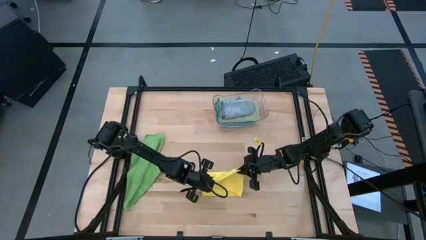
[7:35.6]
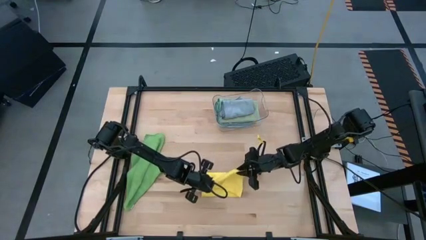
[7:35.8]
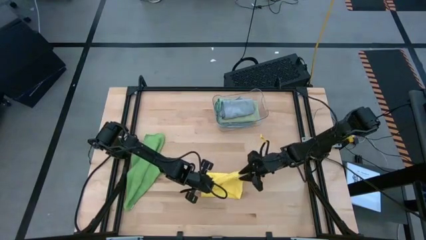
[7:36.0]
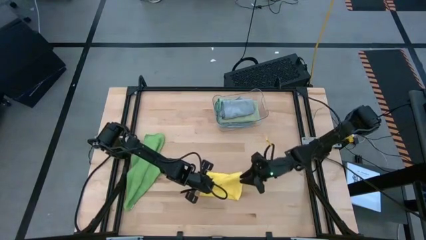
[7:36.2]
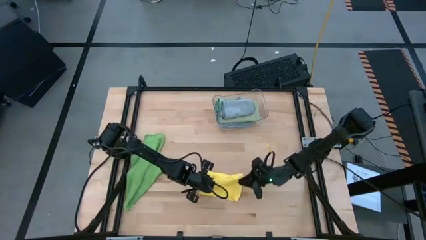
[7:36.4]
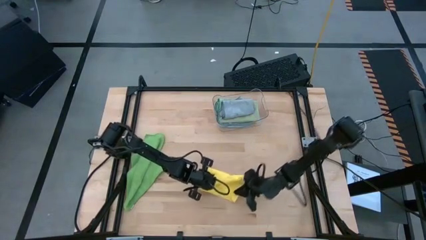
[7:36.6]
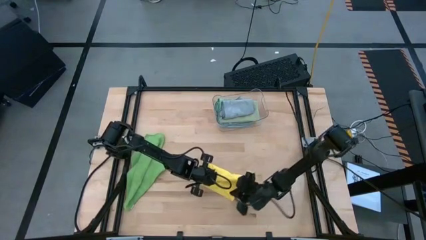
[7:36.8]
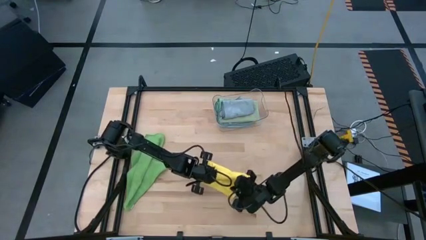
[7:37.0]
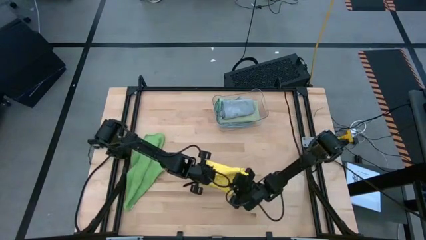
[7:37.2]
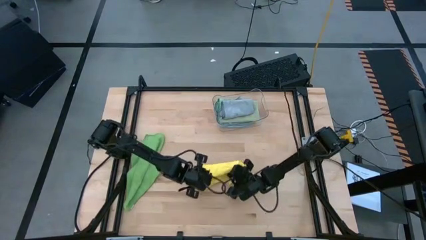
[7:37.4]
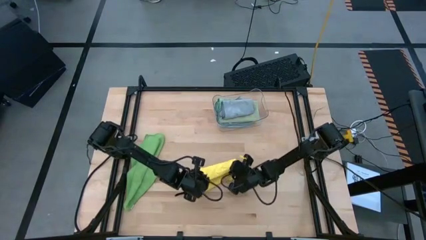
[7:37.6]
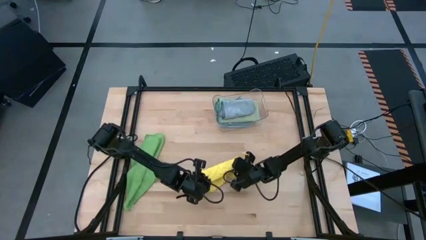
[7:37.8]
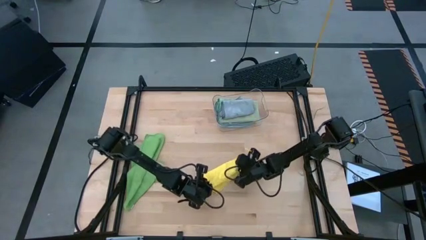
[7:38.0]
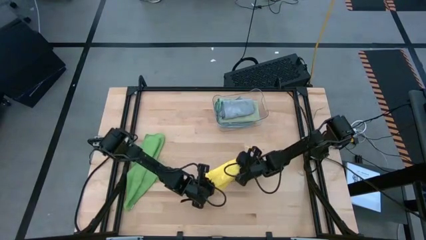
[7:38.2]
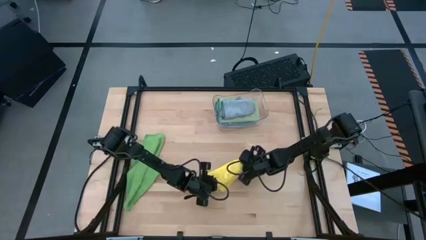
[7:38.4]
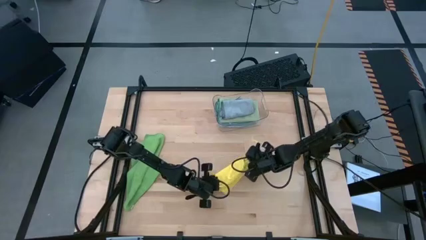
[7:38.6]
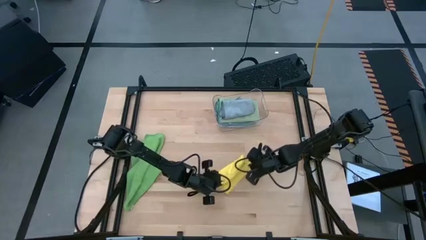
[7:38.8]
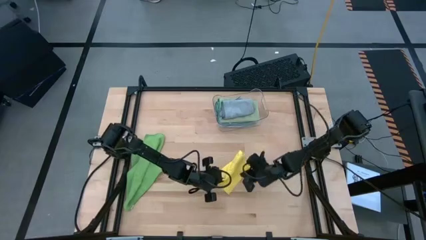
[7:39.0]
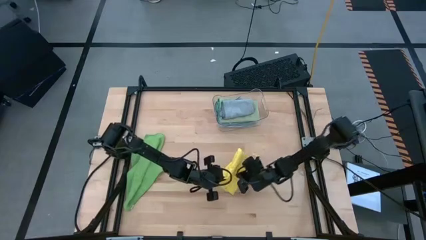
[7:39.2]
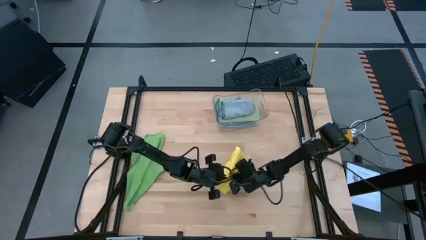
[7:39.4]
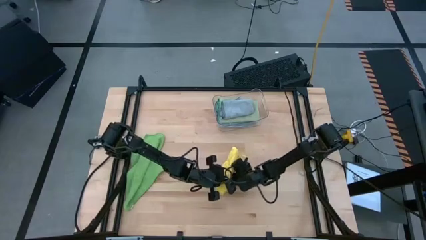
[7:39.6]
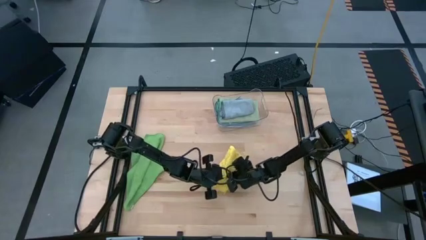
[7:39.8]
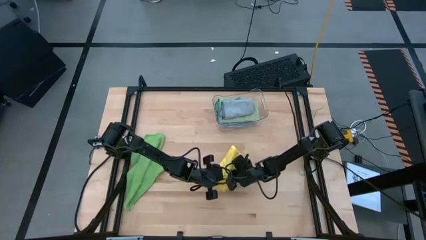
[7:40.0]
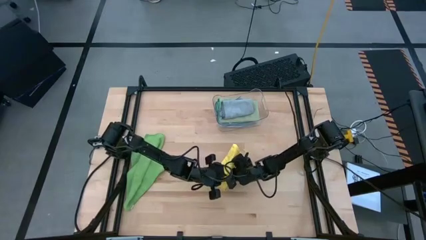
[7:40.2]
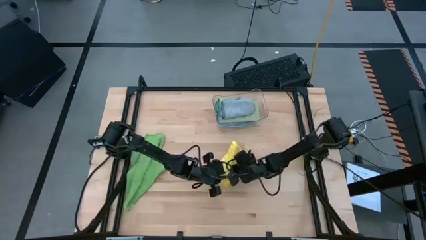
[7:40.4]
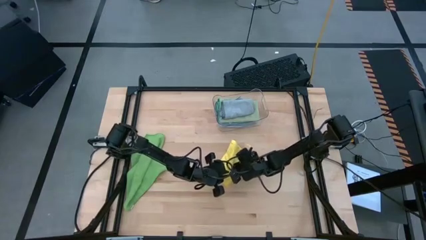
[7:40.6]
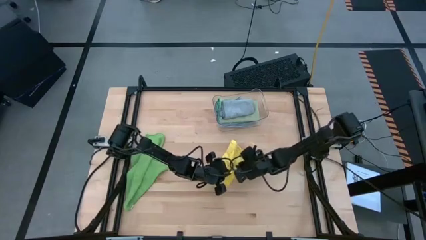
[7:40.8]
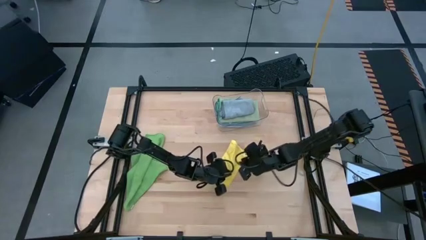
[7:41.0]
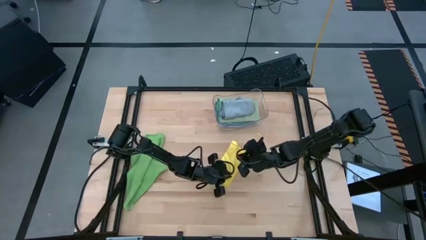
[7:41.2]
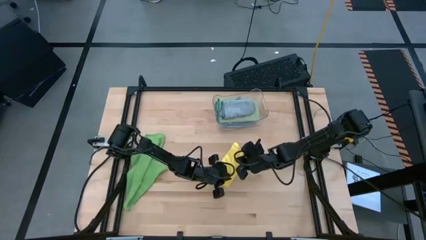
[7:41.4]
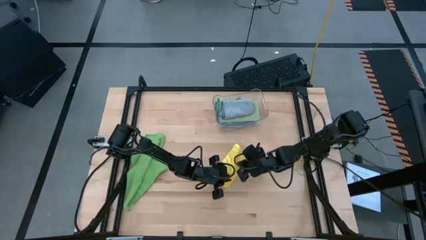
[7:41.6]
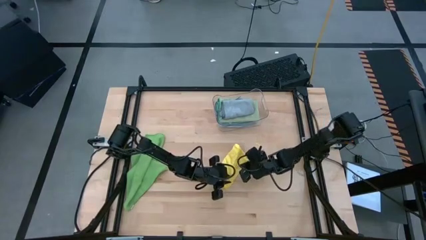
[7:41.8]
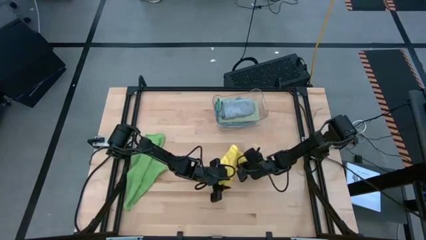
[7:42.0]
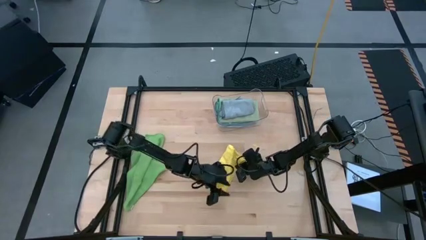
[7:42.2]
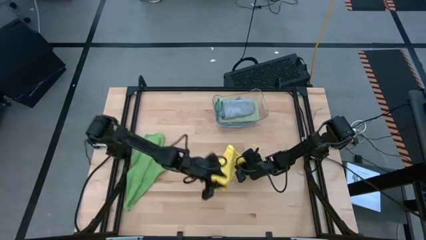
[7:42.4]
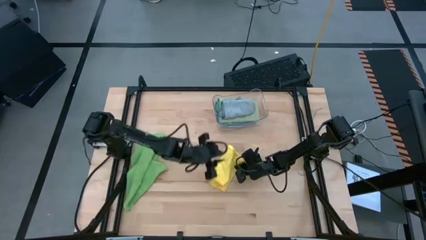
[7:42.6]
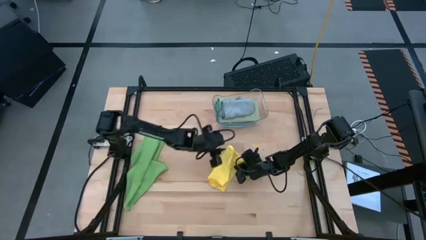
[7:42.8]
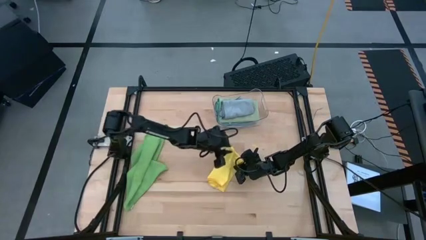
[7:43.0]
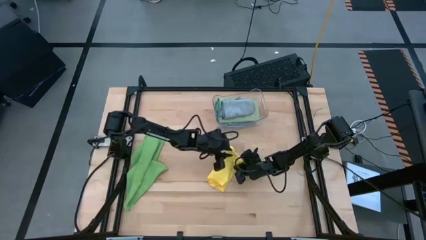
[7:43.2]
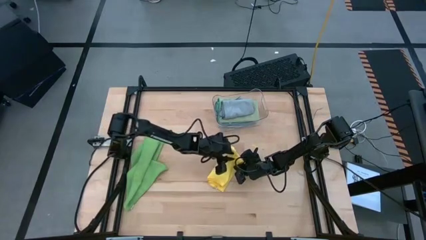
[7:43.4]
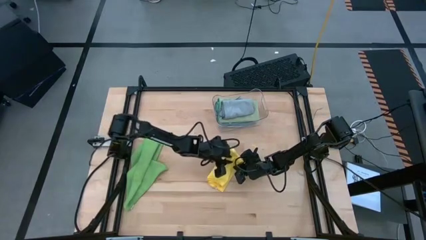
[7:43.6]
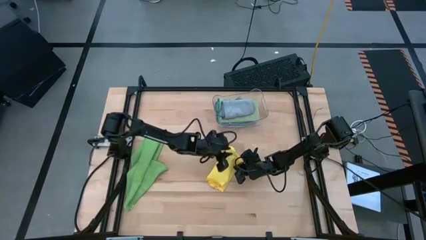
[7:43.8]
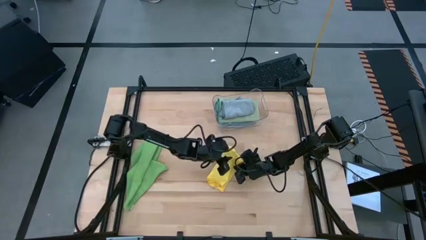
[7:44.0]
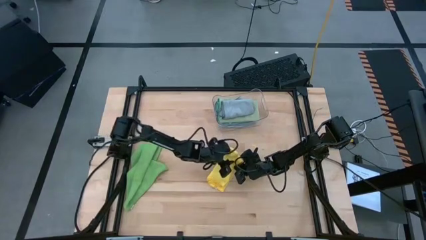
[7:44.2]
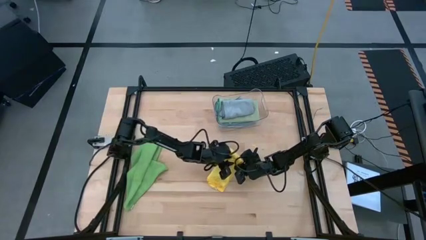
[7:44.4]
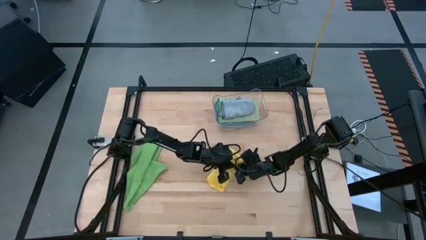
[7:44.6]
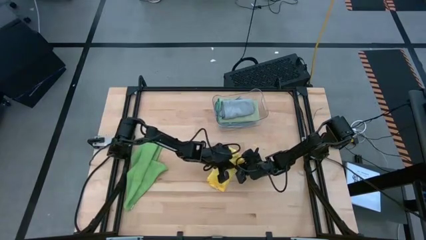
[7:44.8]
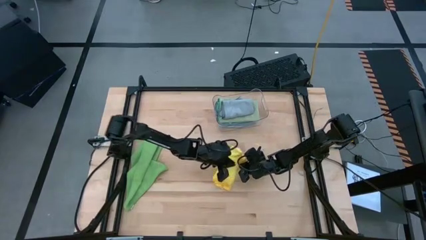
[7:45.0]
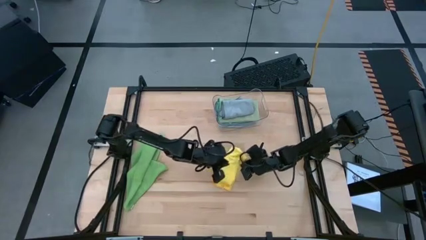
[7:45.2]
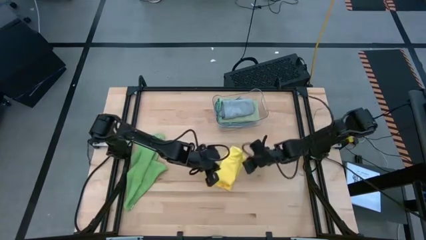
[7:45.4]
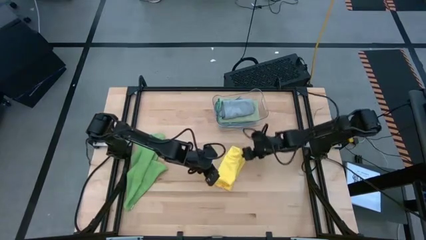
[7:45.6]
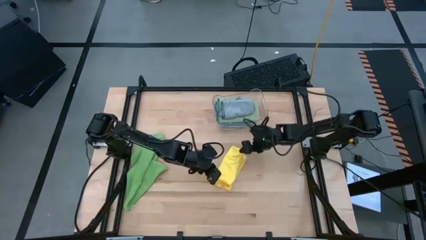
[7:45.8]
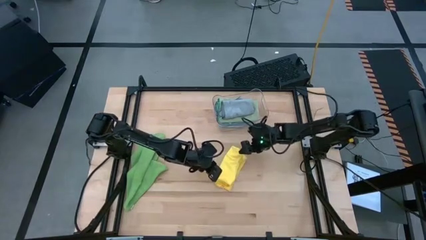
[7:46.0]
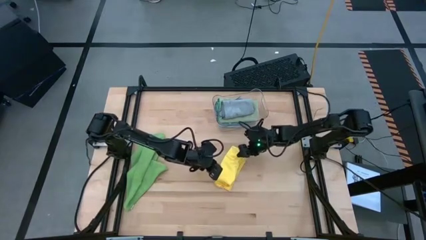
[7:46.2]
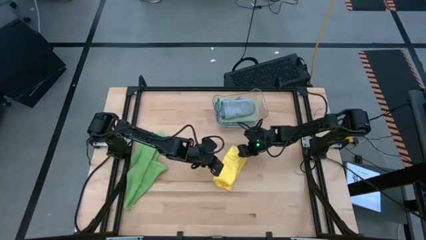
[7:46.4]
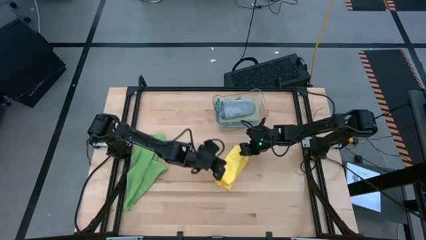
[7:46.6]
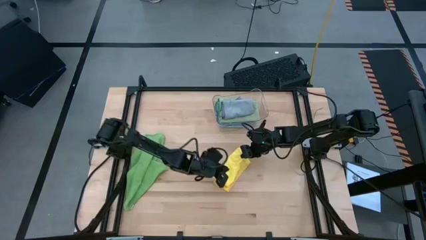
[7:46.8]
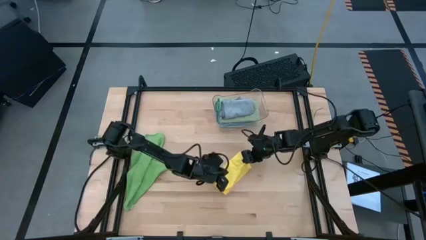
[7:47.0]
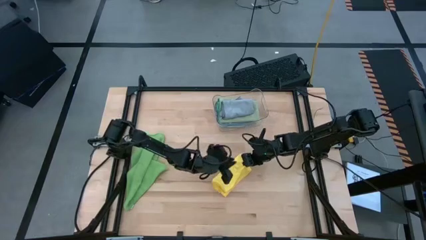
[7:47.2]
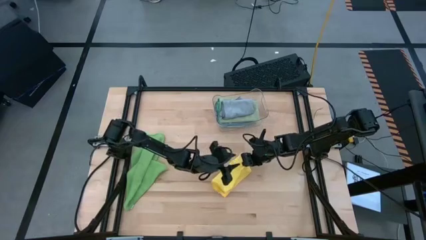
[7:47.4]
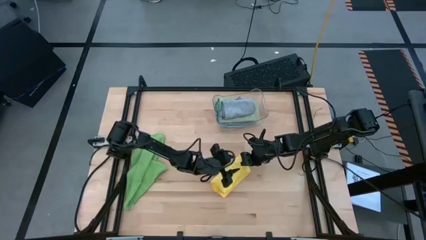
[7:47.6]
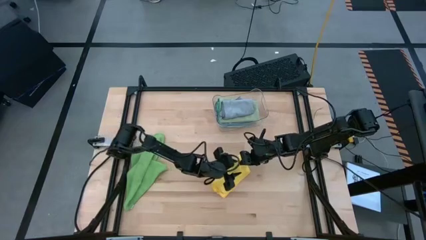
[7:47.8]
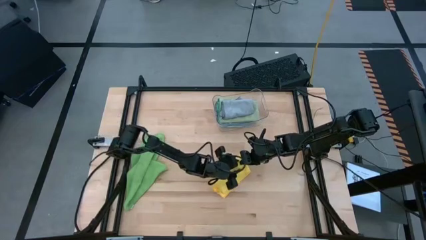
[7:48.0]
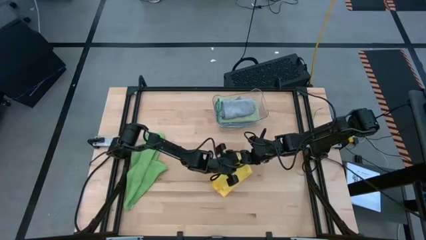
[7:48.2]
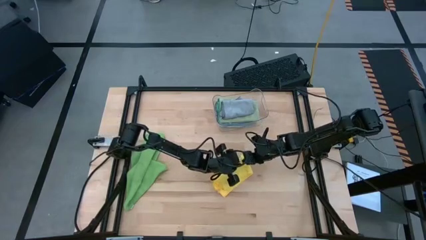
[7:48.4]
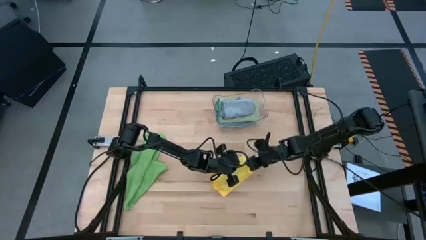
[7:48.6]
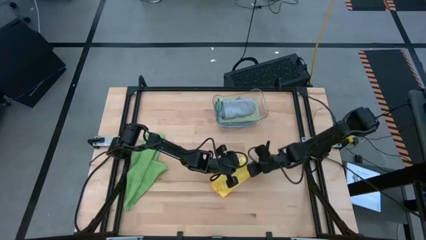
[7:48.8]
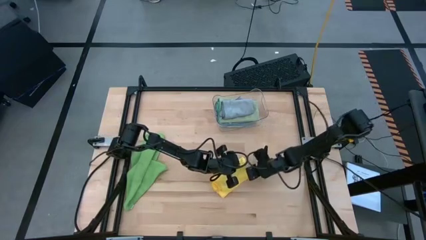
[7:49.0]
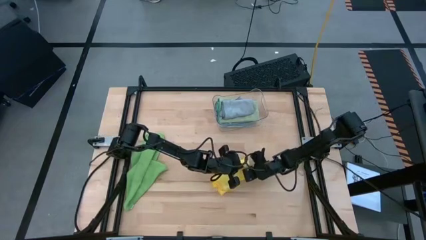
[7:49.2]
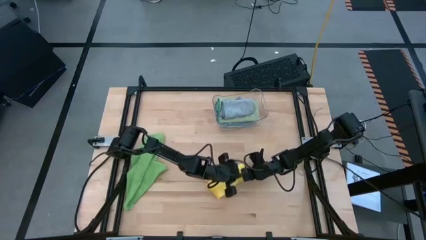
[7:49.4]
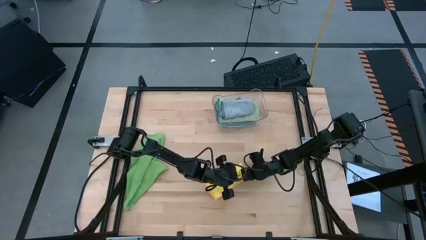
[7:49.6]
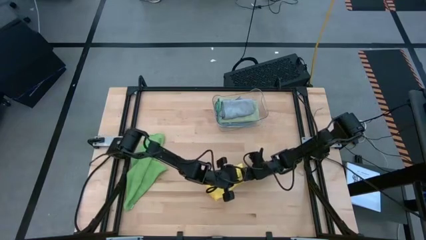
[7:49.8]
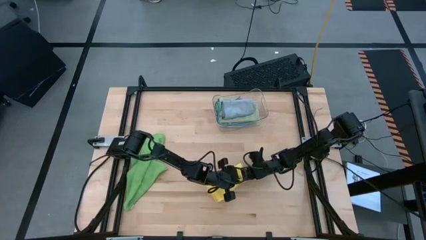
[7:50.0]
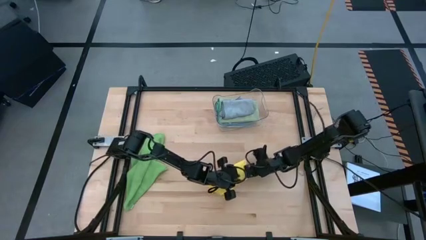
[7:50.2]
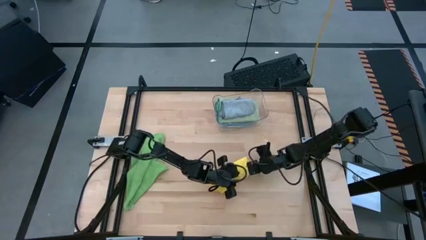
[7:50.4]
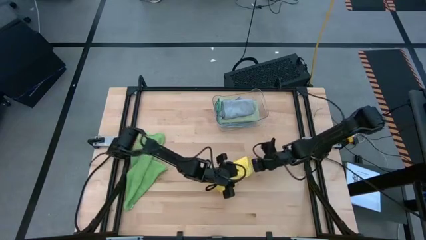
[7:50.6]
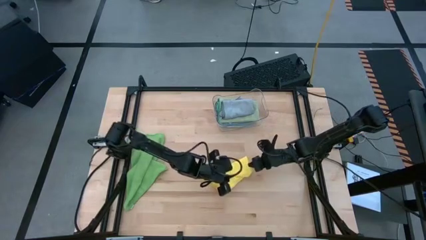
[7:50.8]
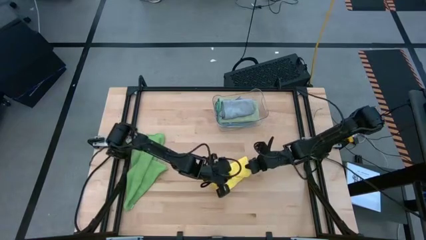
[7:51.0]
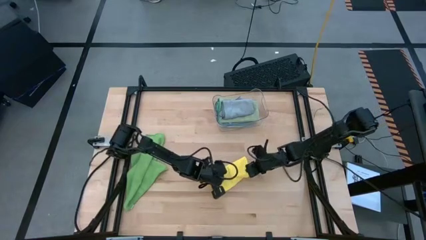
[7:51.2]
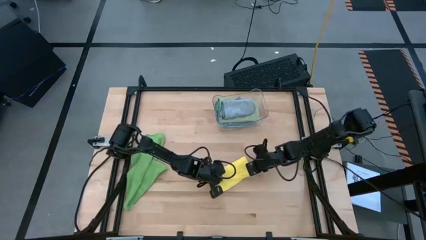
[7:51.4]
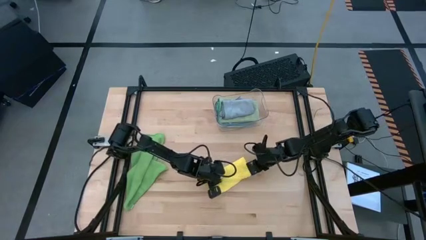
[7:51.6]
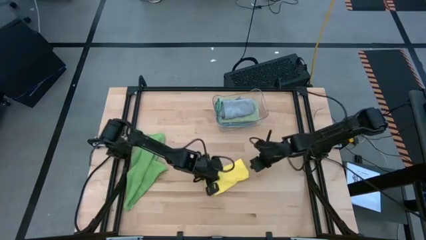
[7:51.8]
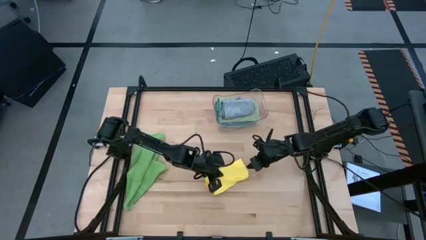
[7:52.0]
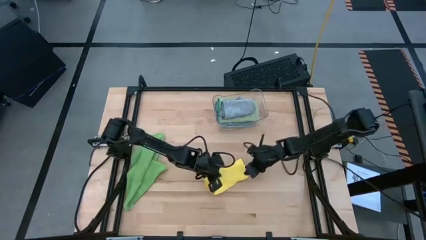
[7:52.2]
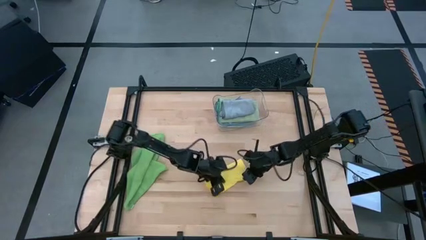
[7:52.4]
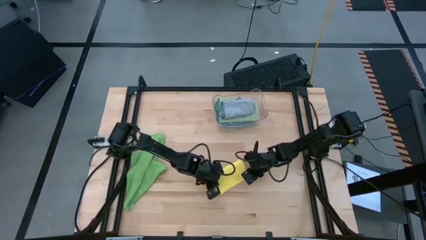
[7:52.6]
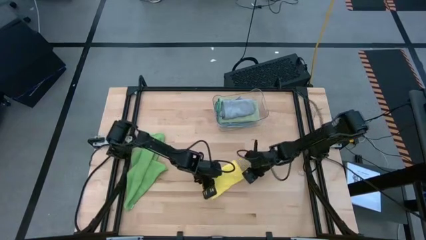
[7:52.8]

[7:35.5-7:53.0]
Task: Fold microfiber towels
Fold the yellow towel
